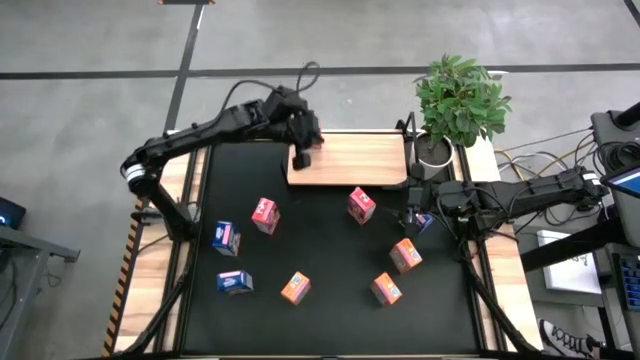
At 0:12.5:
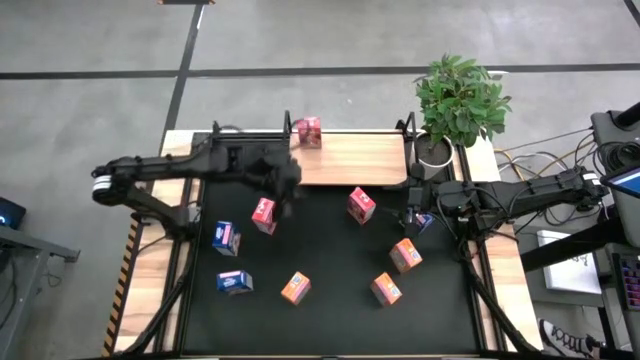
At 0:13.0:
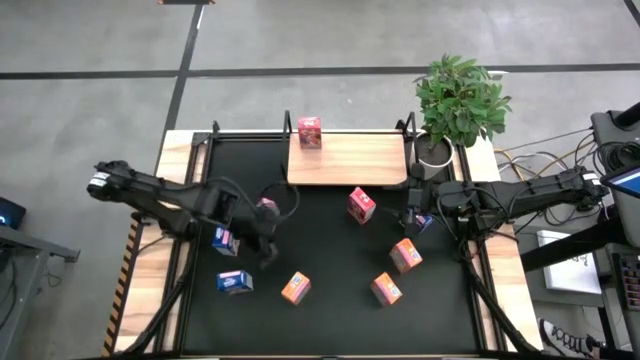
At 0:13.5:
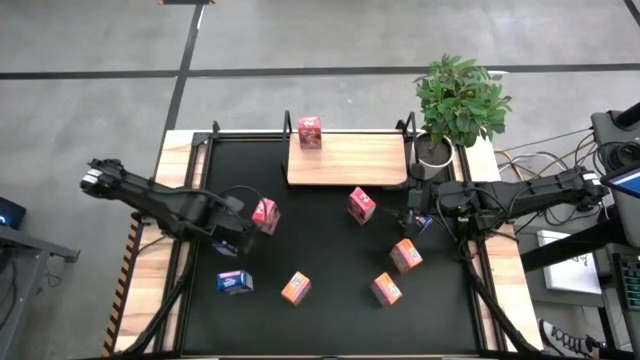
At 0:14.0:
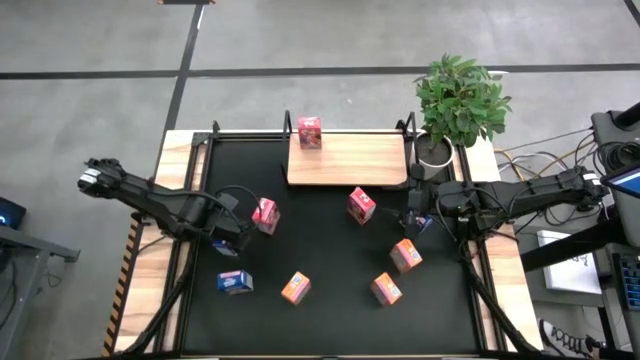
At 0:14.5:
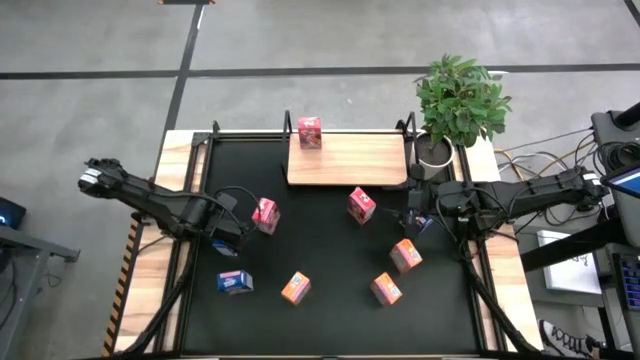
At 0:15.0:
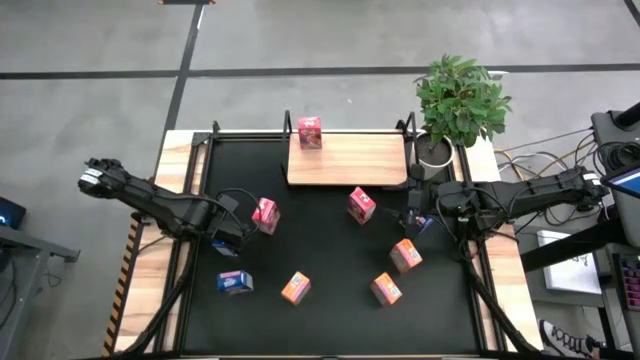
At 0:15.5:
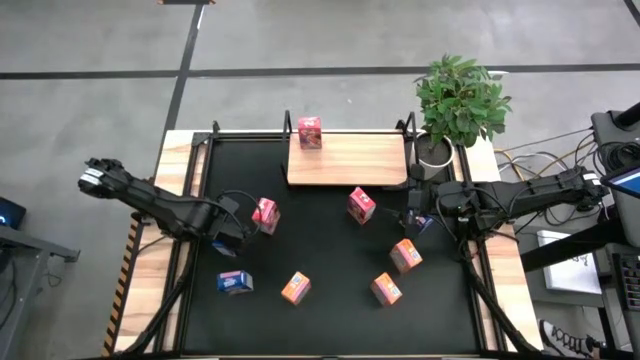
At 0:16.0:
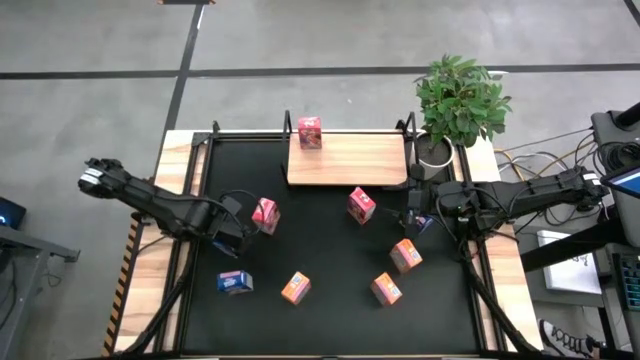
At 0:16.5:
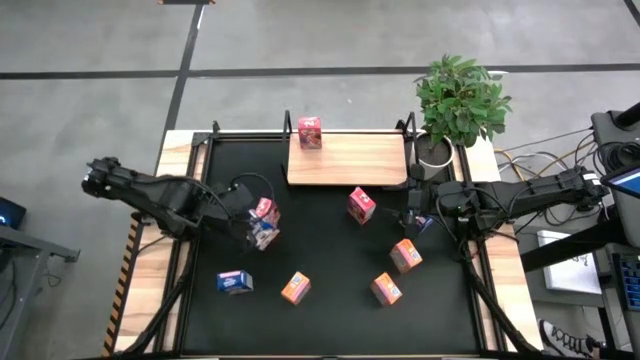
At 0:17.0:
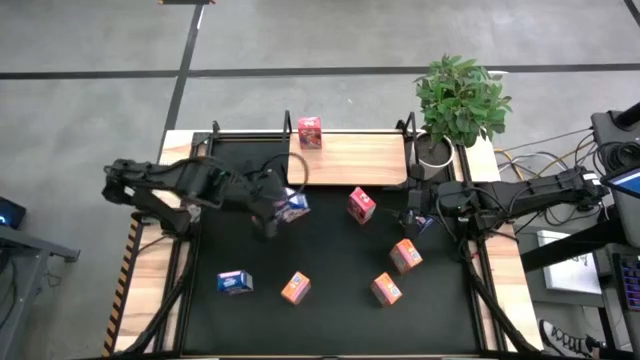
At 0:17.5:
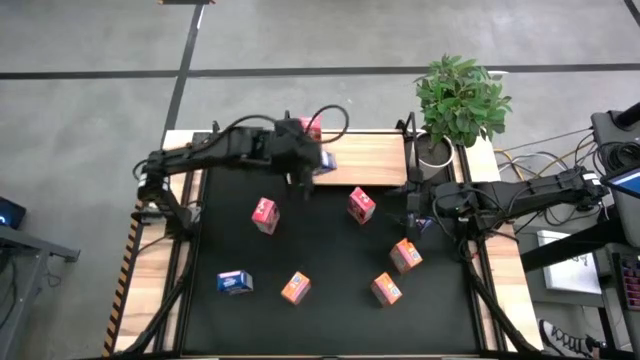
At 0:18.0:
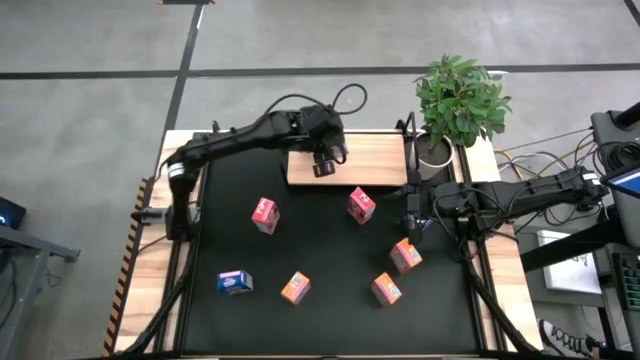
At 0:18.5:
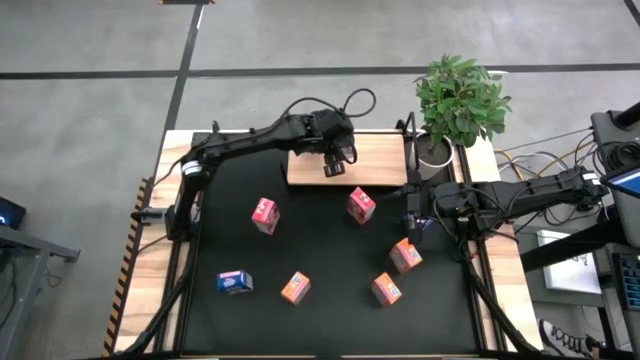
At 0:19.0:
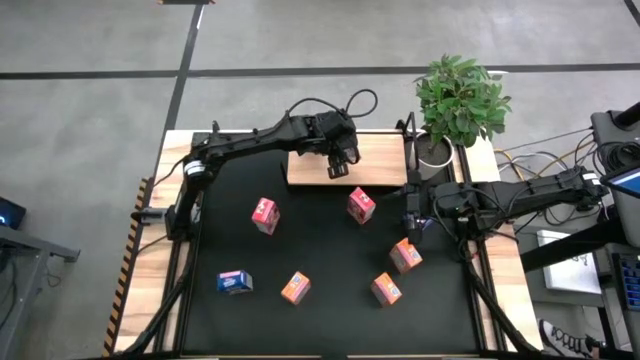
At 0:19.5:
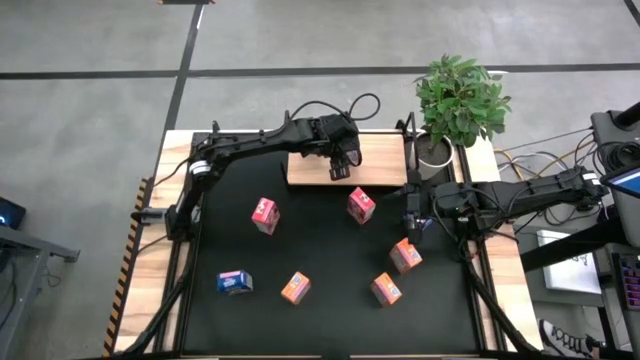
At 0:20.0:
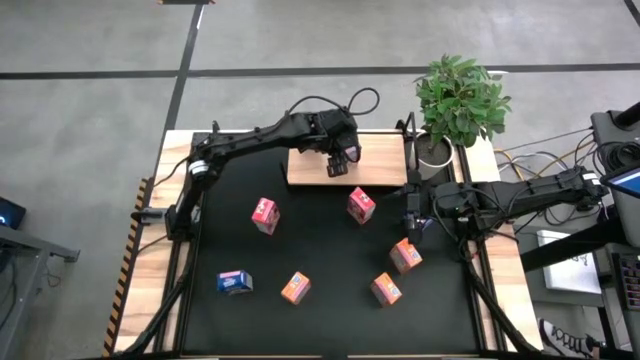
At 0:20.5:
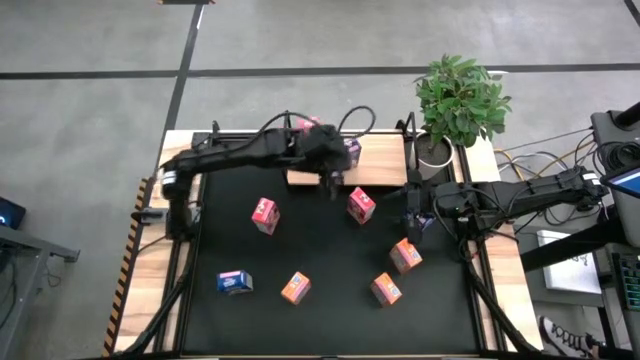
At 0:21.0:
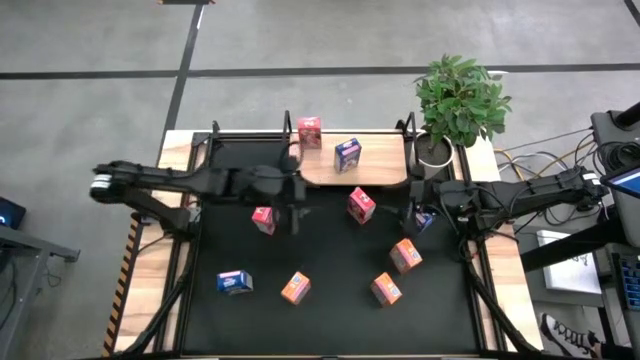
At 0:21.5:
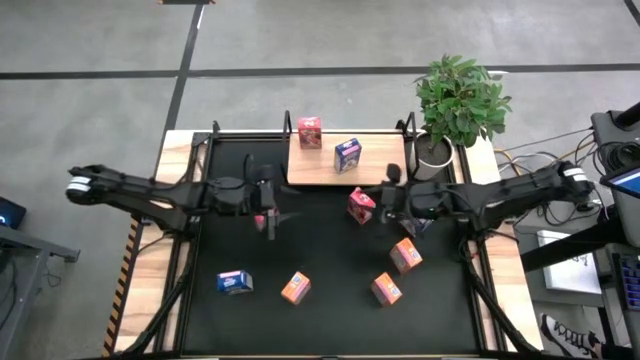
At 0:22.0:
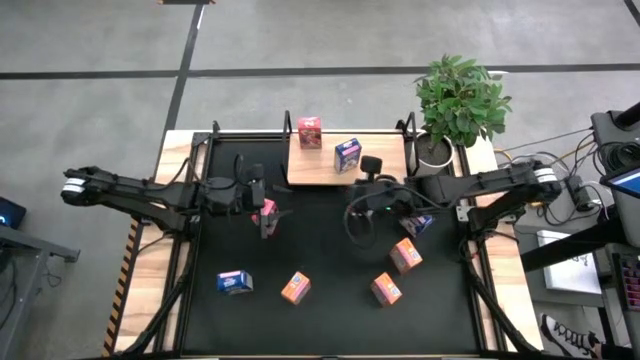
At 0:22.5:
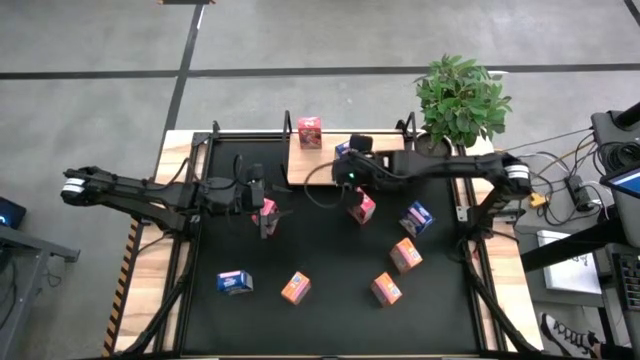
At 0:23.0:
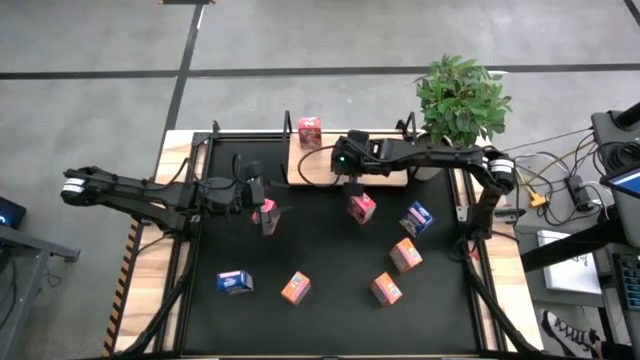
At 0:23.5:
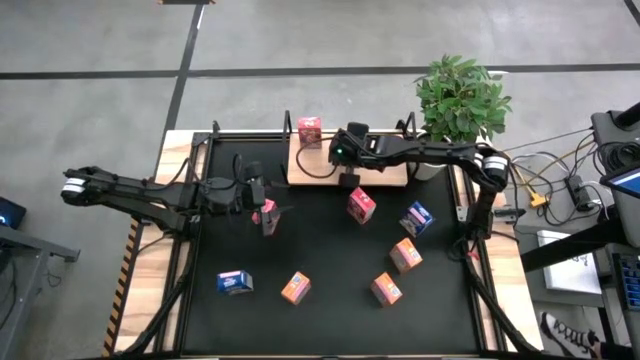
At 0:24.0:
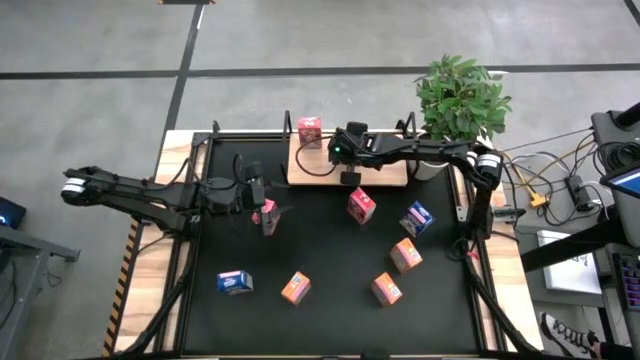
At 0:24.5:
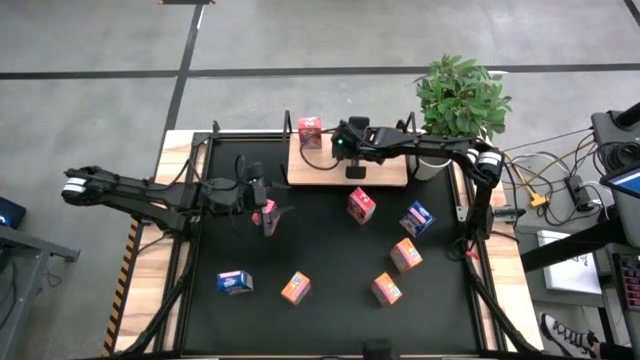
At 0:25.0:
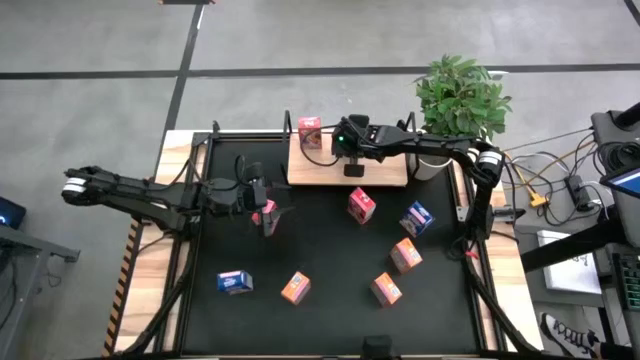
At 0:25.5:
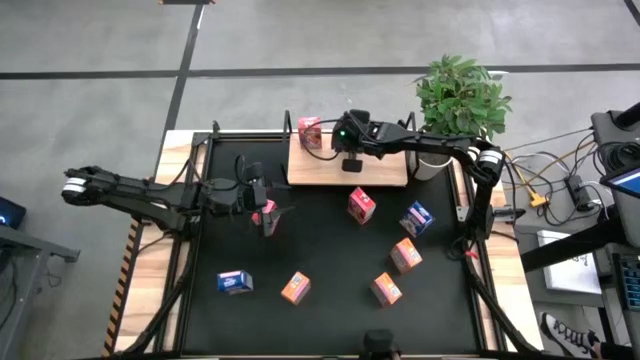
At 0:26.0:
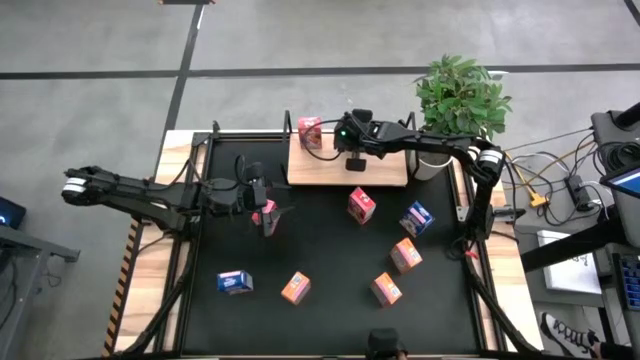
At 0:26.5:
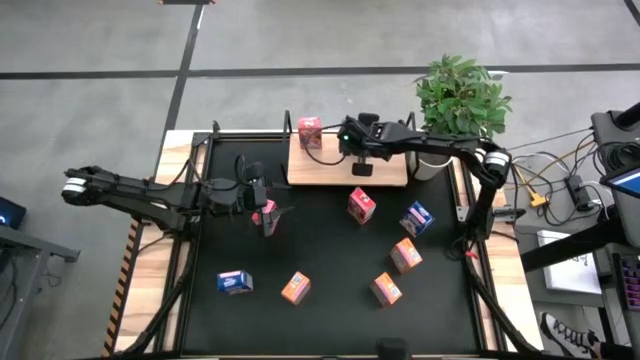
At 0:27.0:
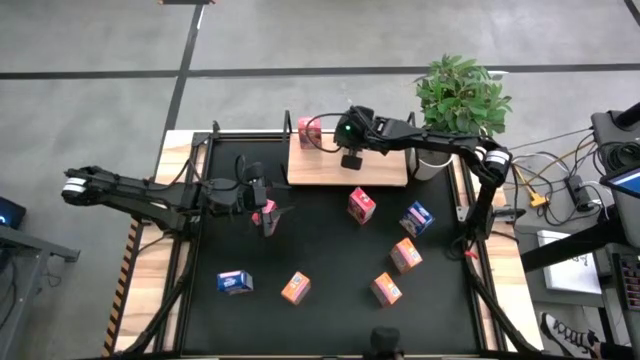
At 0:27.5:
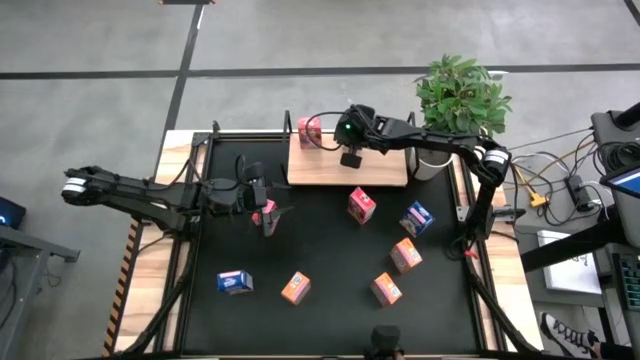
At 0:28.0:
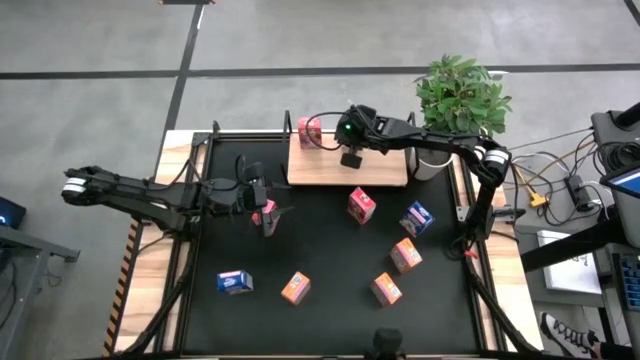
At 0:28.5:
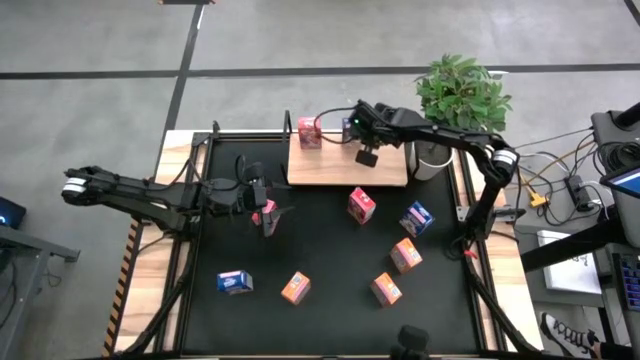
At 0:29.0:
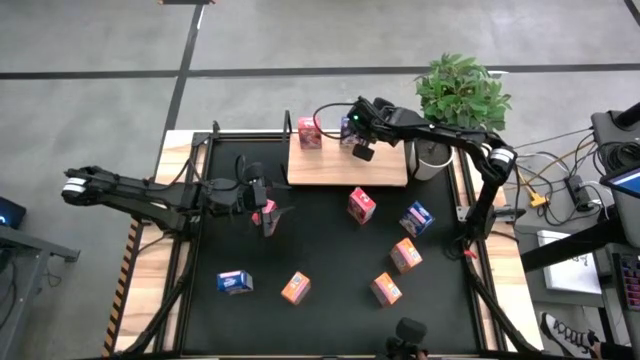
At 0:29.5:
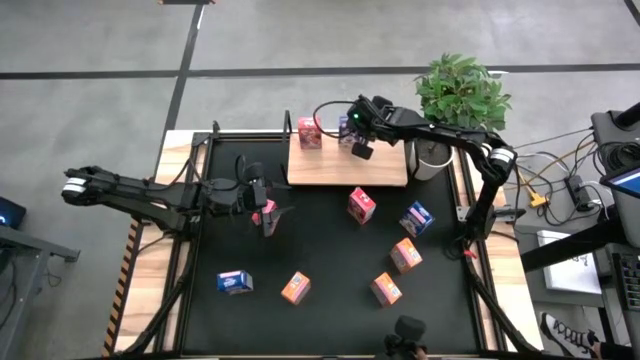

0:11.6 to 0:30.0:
Task: Stack cereal on shelf
Put the top left blue cereal box on the shelf

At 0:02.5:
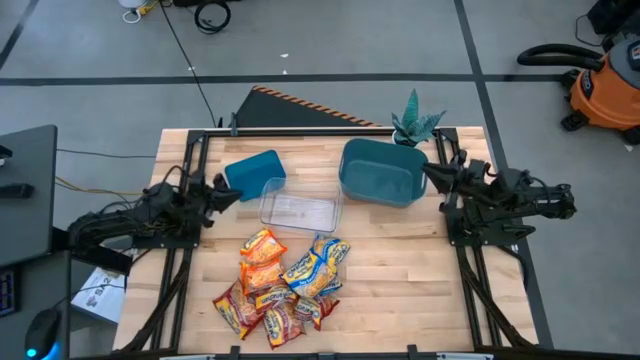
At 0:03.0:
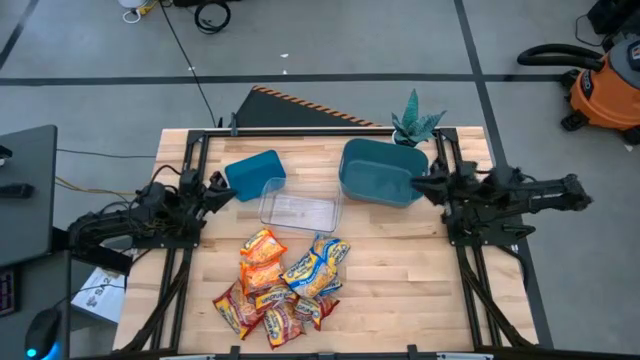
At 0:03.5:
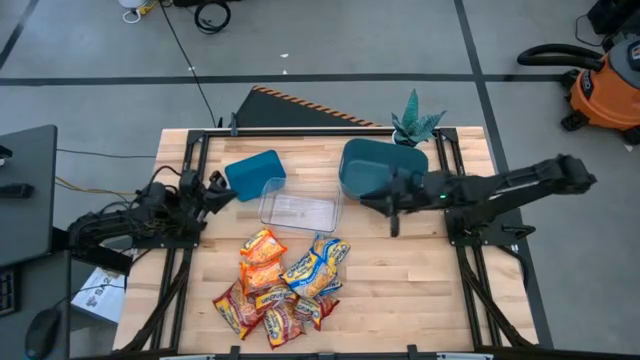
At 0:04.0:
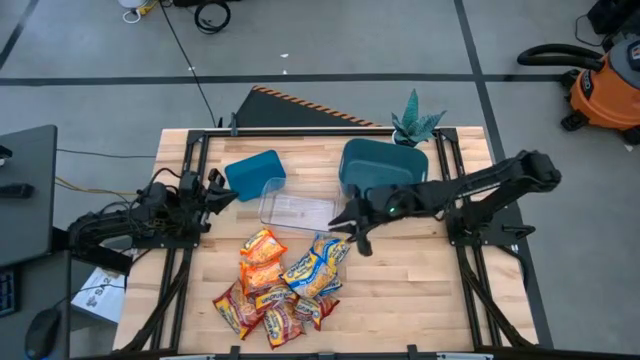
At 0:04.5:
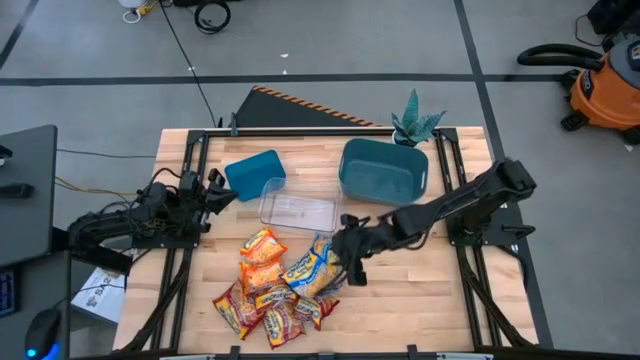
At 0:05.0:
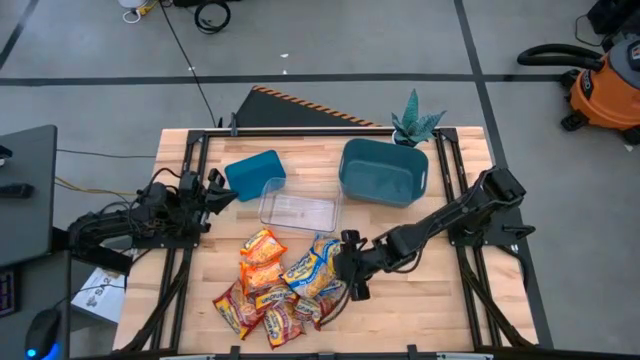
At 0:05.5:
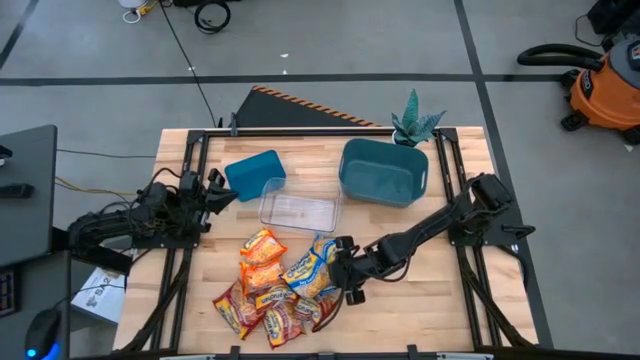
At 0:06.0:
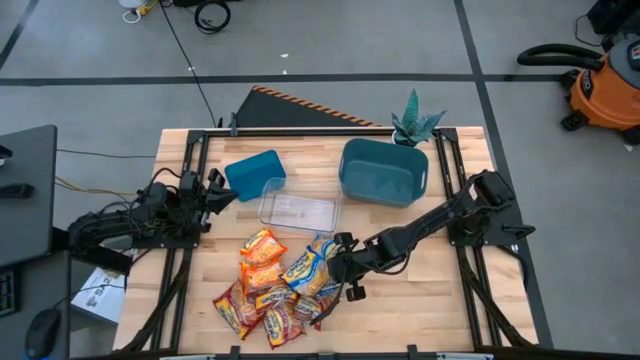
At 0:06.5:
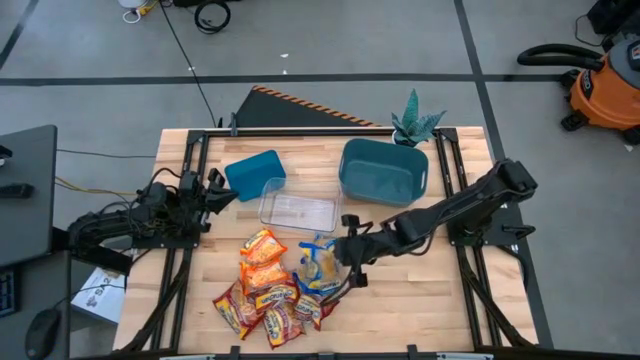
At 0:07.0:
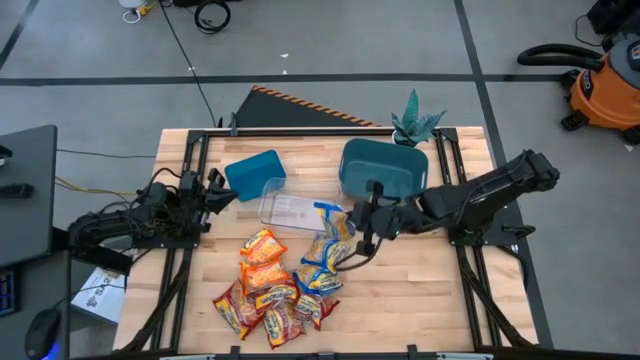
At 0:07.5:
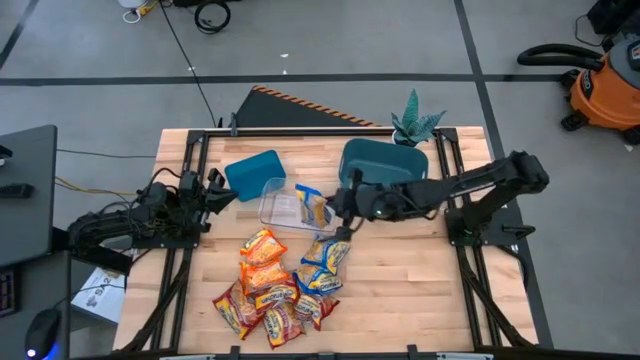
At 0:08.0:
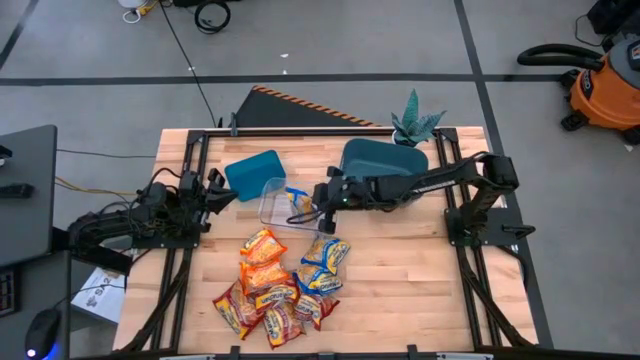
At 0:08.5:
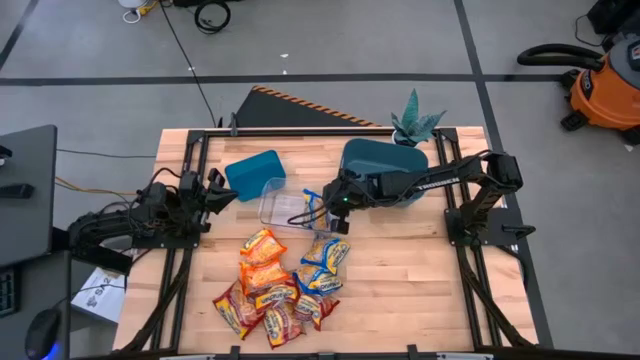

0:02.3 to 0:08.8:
Task: Sort Maruchan noodles
Put the blue noodle pack into the center transparent bin
